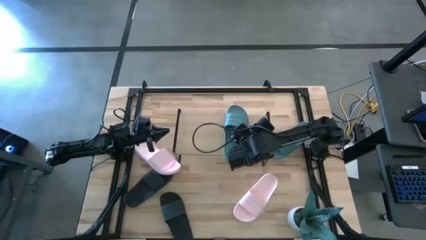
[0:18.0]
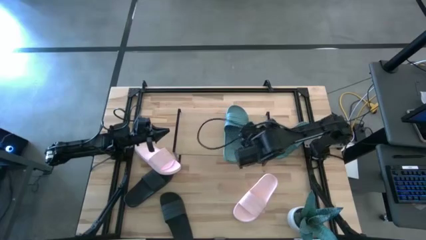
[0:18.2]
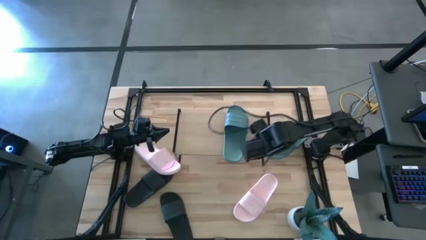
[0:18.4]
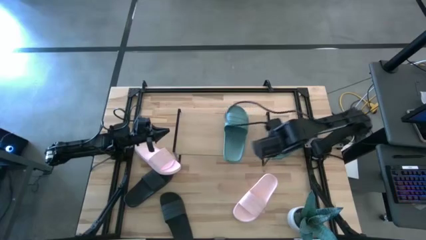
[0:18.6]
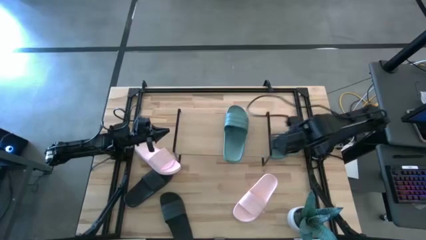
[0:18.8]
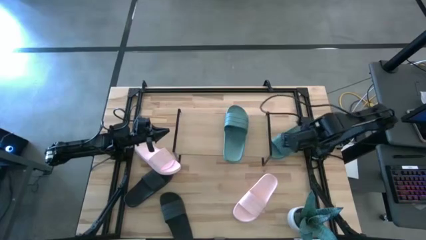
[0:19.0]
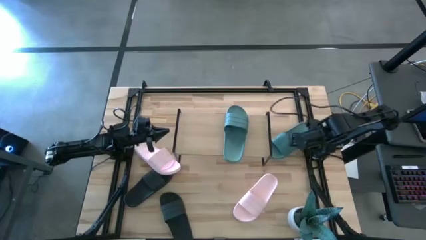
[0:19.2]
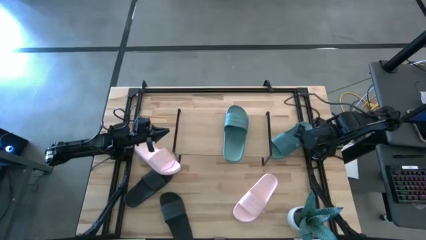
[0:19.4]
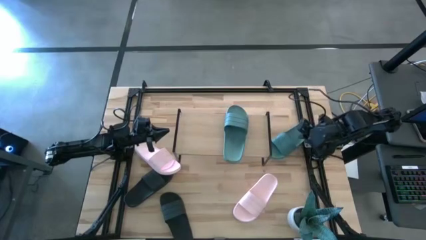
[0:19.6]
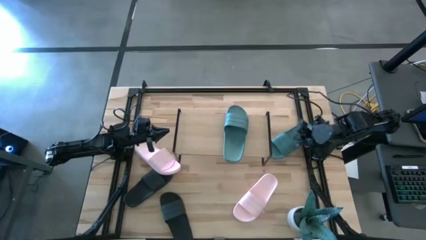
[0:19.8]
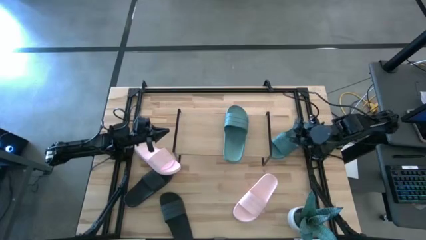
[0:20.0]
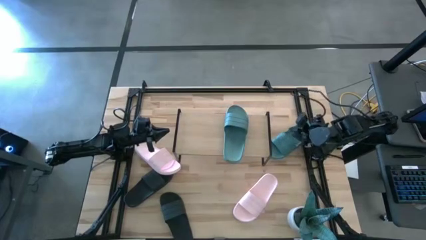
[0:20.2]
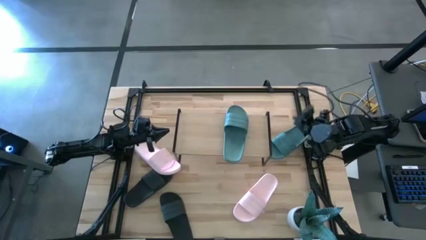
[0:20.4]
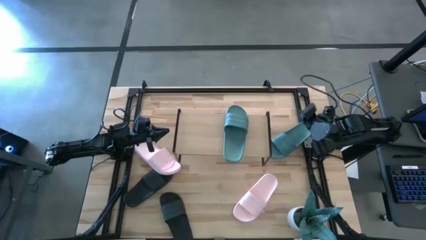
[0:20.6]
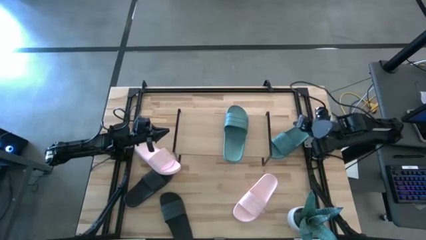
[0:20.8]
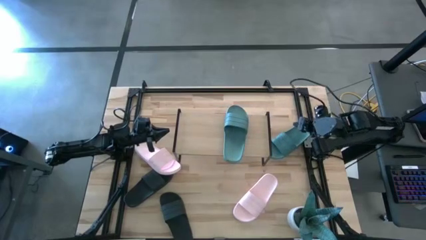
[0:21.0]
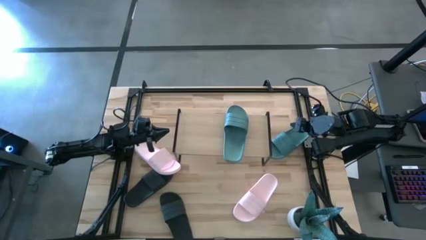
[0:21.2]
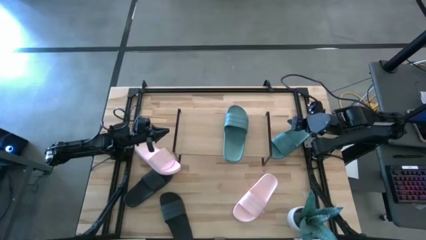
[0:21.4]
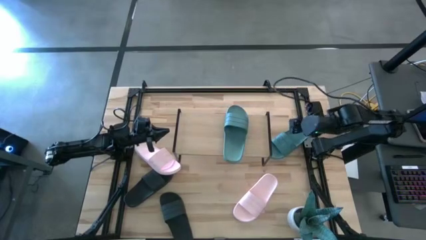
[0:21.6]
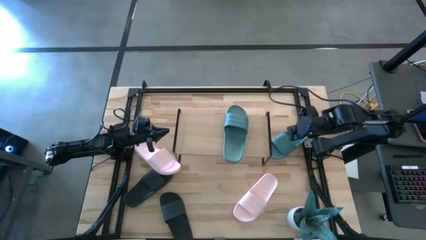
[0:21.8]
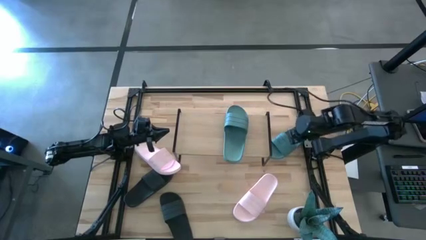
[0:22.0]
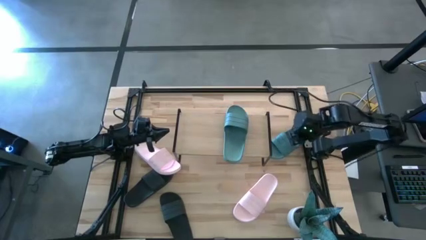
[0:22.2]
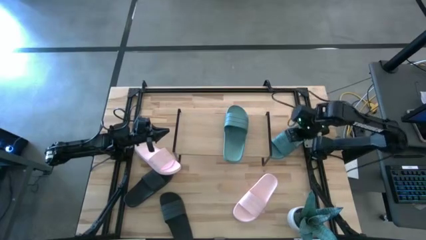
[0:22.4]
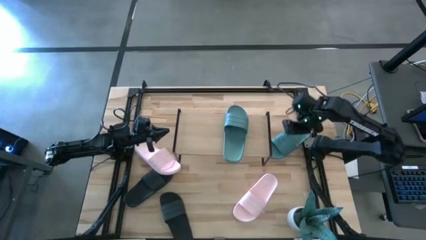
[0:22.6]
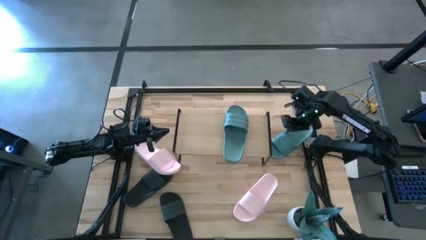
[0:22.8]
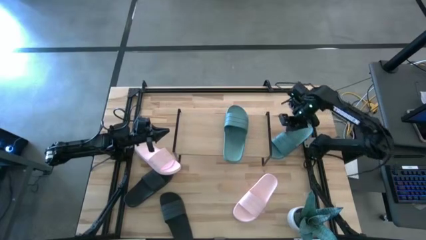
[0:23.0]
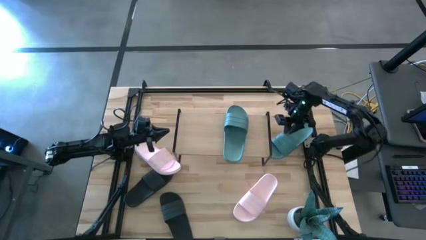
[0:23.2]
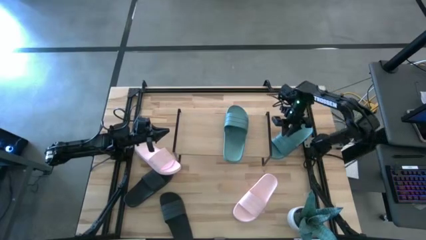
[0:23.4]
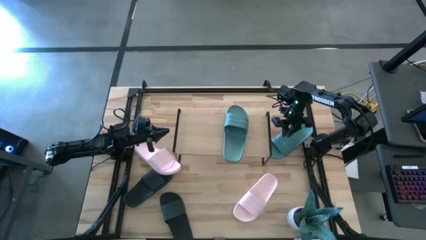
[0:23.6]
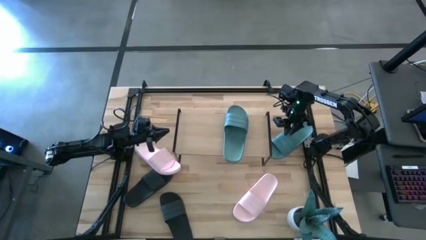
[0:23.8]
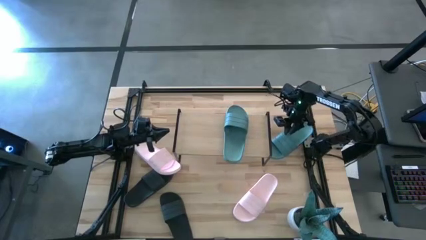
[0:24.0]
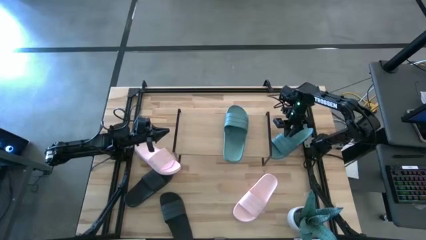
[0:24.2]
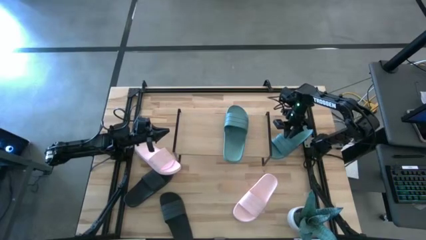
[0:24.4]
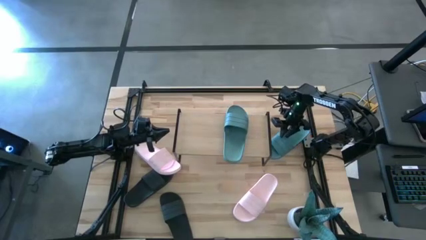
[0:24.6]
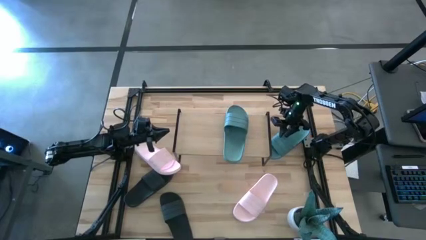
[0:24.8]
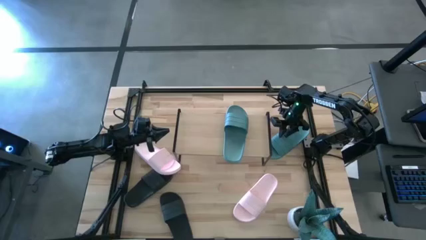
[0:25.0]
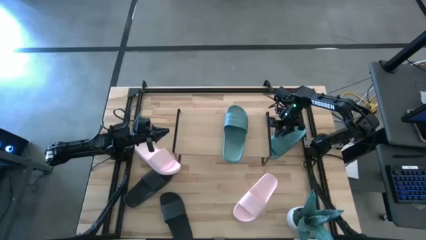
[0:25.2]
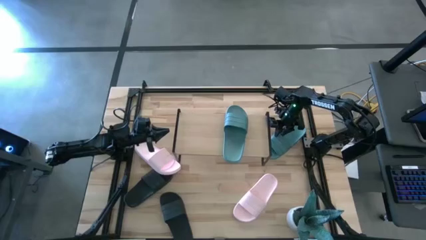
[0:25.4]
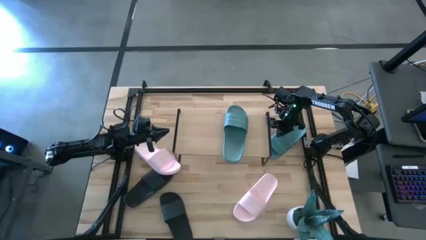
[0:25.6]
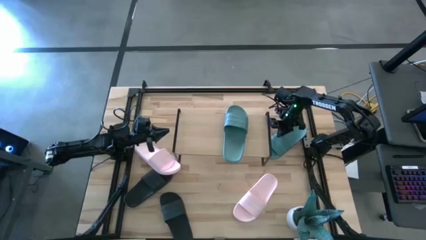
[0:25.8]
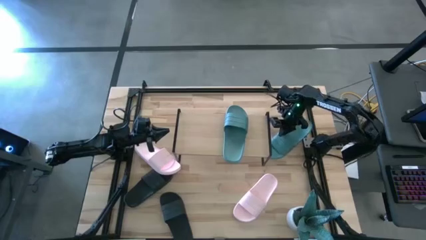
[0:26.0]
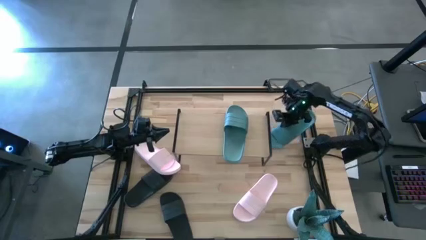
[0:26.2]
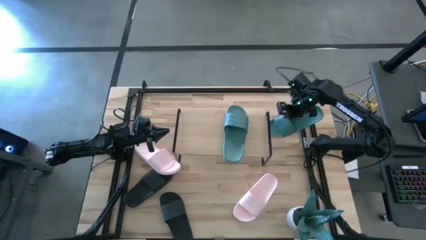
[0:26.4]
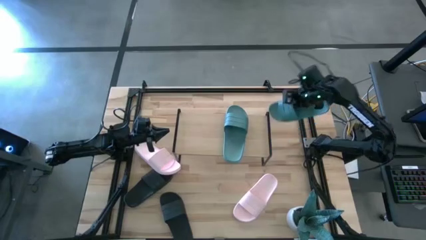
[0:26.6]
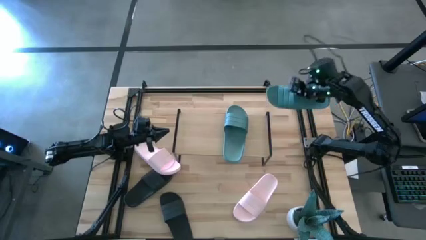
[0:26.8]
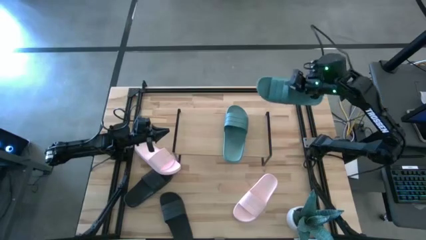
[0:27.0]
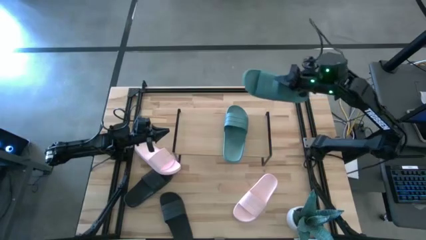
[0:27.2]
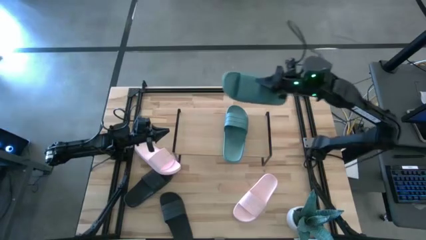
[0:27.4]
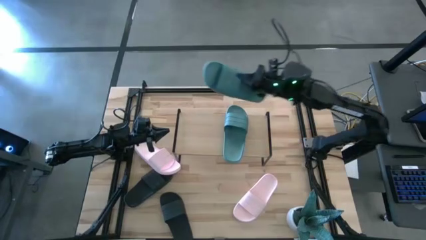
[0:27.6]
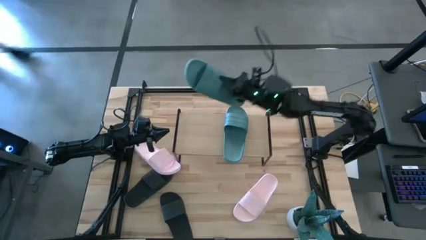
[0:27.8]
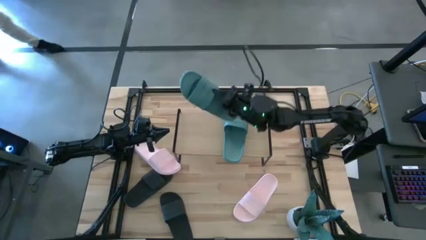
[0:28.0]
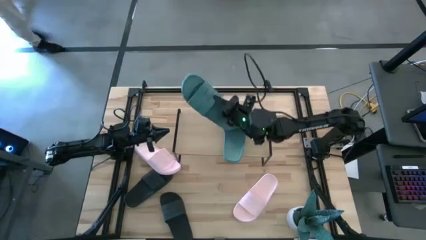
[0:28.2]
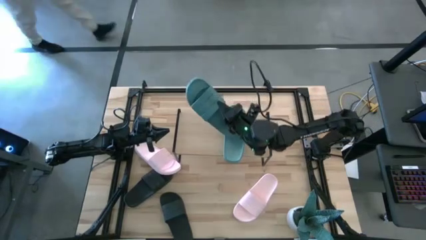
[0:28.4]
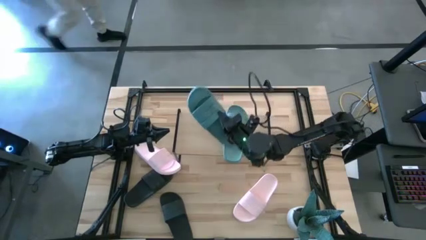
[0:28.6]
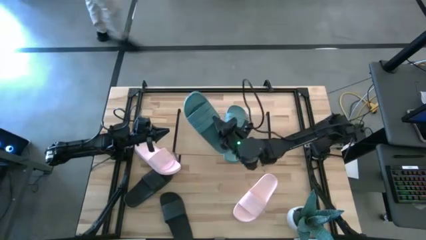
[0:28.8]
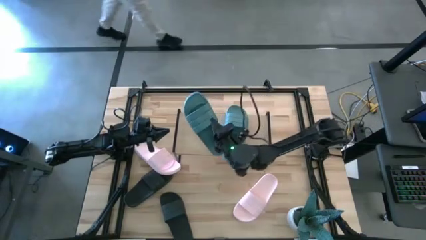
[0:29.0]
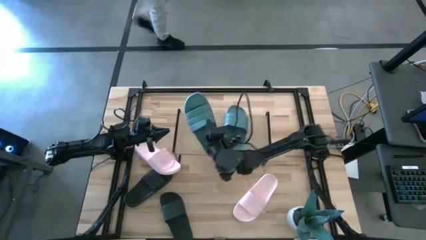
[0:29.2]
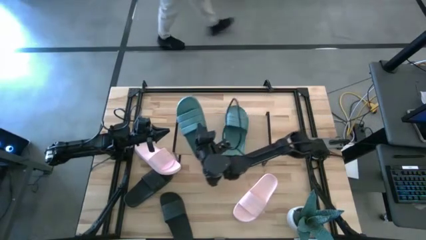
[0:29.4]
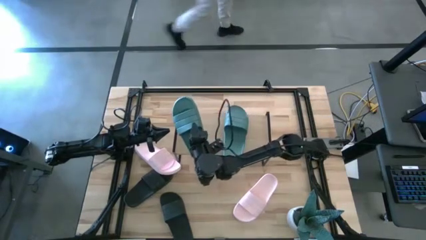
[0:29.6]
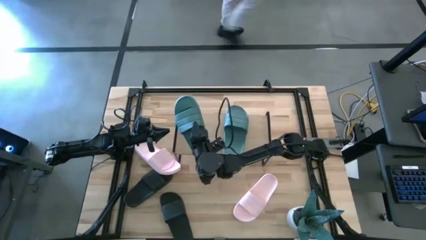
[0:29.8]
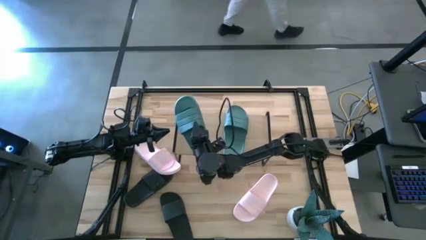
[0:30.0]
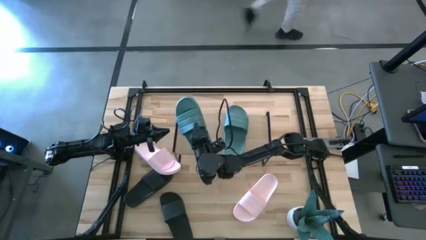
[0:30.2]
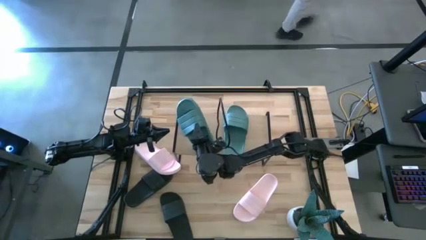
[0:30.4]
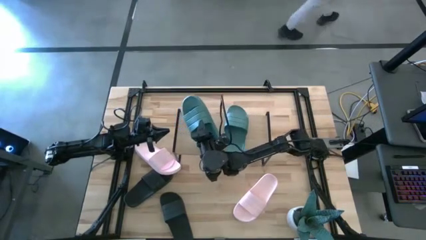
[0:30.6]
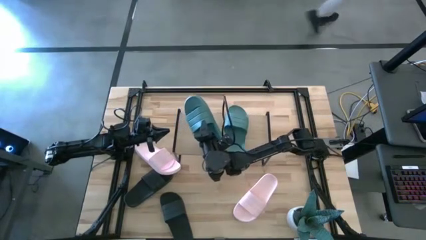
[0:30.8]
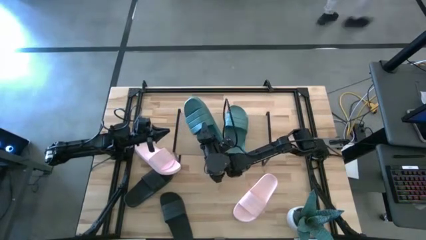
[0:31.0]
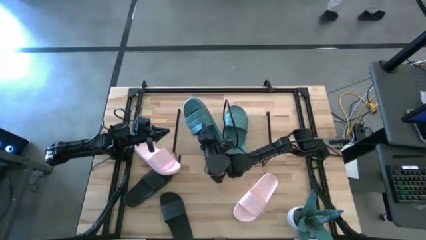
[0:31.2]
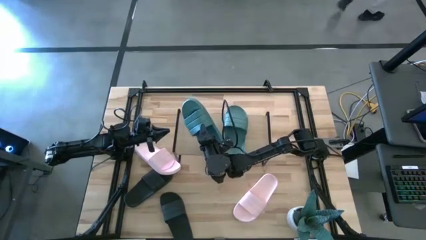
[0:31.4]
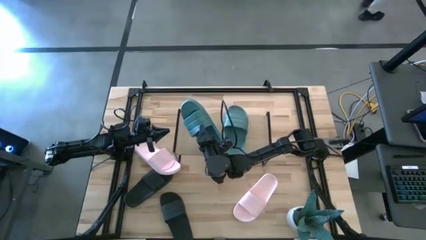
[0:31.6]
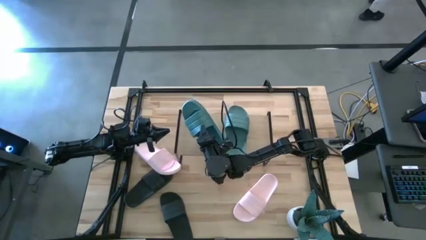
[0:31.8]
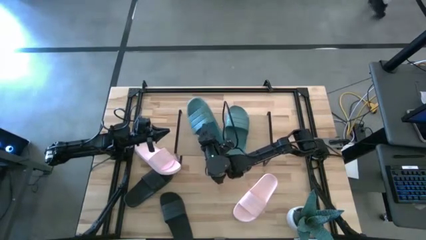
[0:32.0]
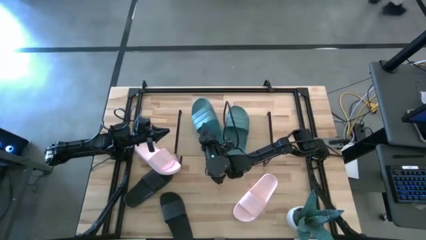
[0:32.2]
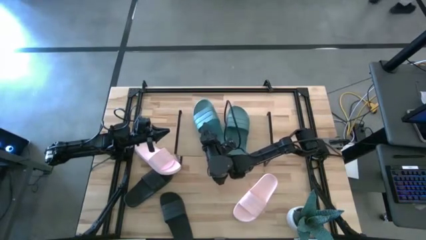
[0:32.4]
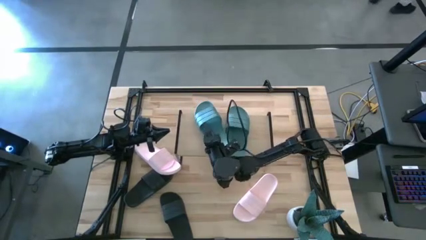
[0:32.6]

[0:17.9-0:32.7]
Task: Pick and place slides into the shelf
Put the green slipper on the shelf
